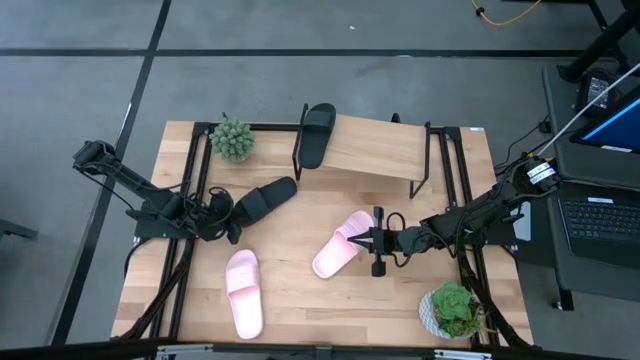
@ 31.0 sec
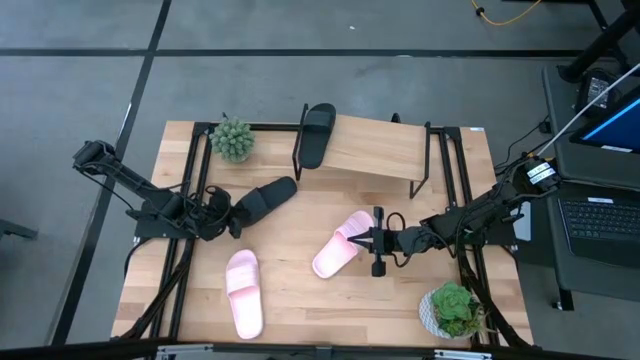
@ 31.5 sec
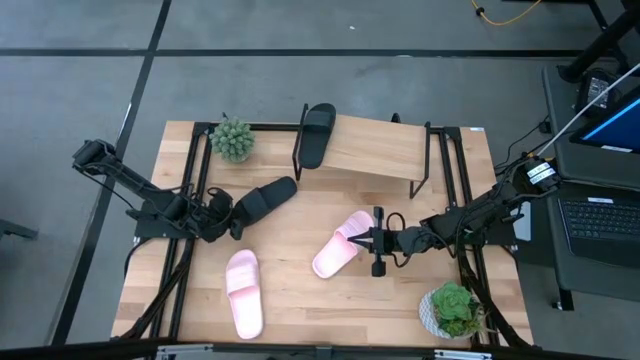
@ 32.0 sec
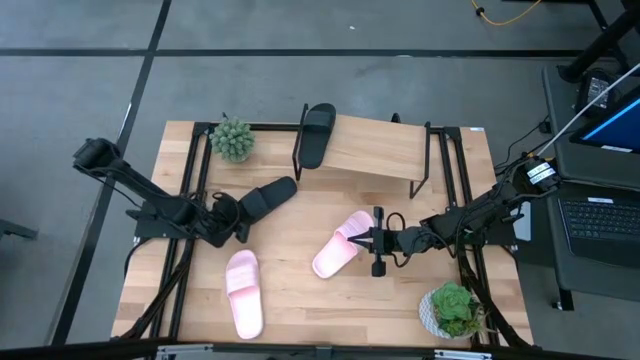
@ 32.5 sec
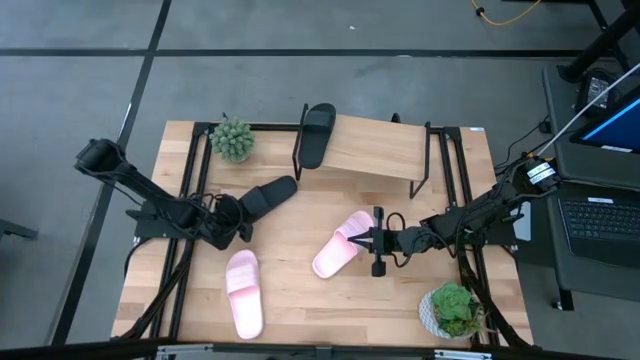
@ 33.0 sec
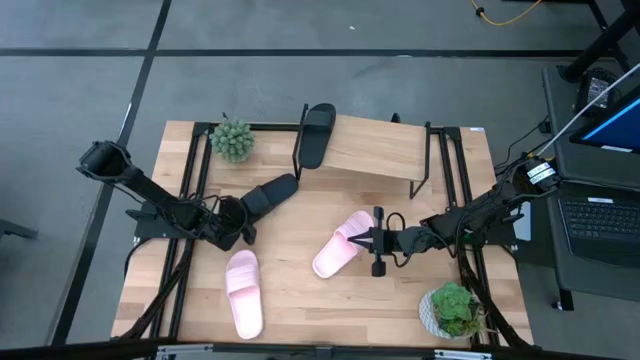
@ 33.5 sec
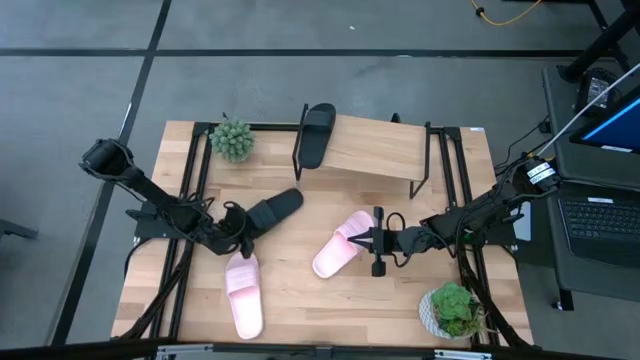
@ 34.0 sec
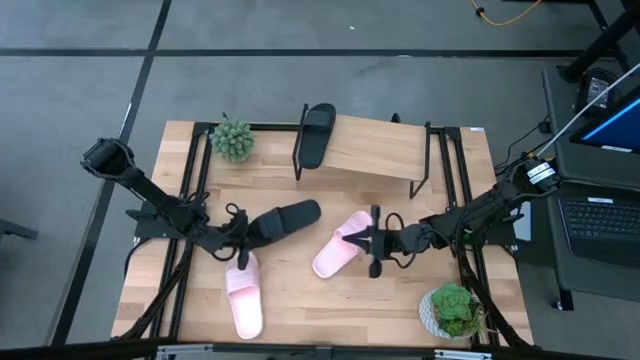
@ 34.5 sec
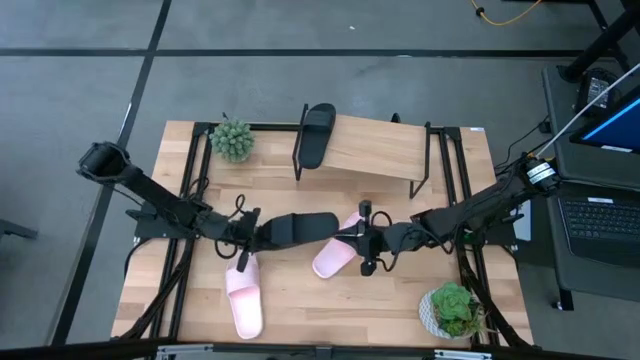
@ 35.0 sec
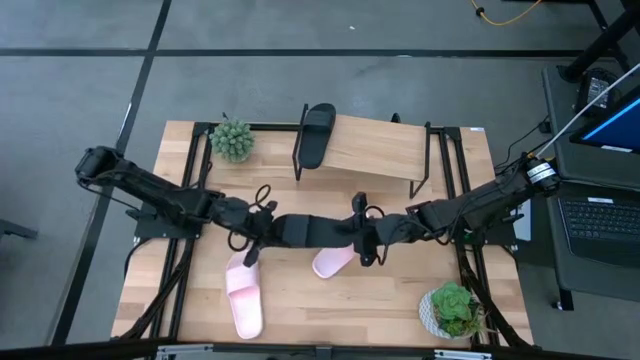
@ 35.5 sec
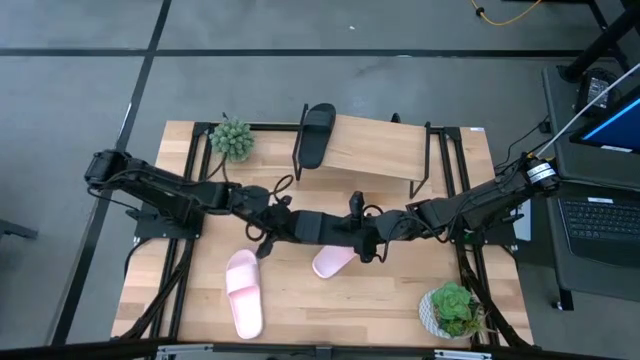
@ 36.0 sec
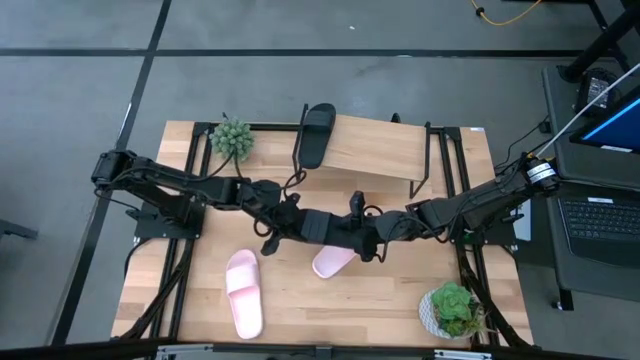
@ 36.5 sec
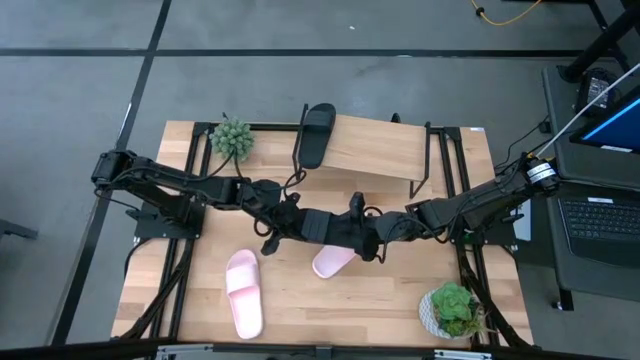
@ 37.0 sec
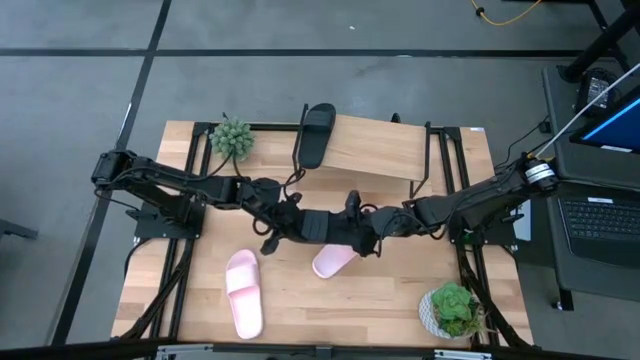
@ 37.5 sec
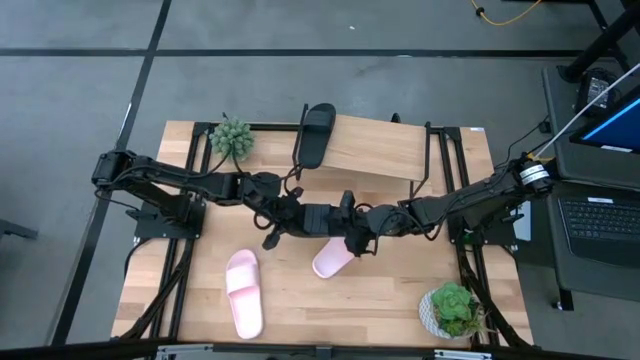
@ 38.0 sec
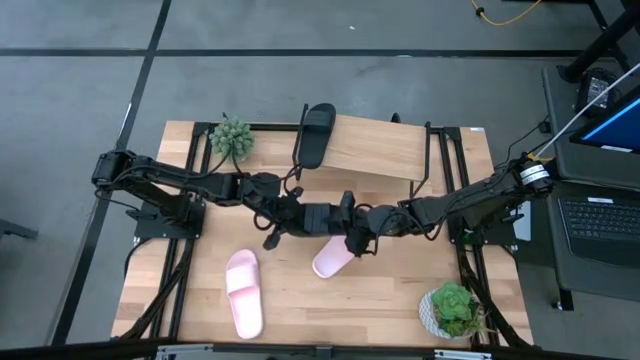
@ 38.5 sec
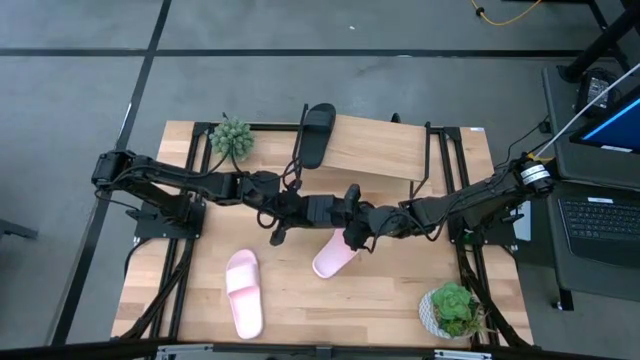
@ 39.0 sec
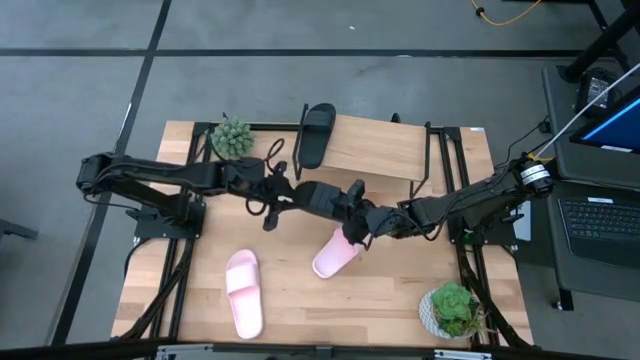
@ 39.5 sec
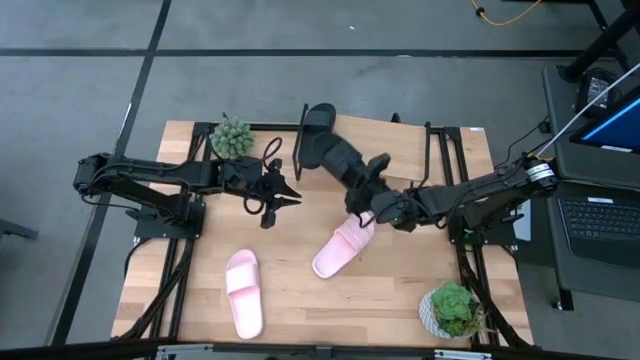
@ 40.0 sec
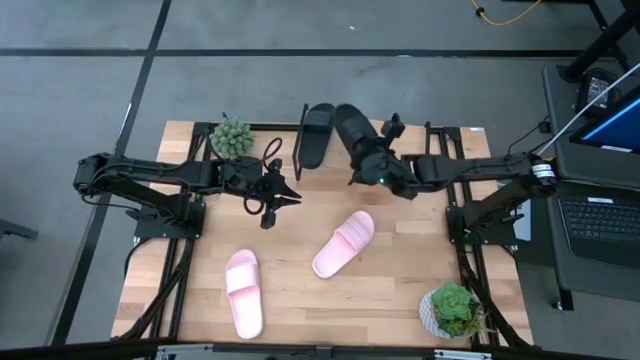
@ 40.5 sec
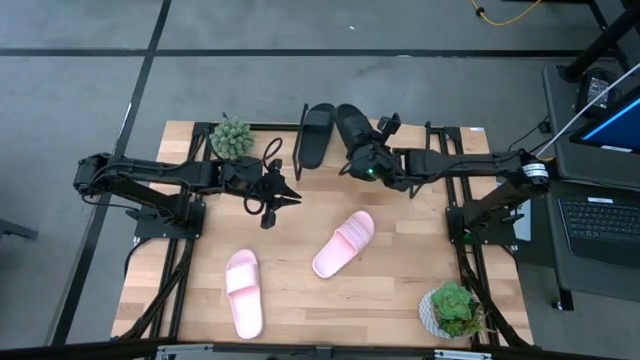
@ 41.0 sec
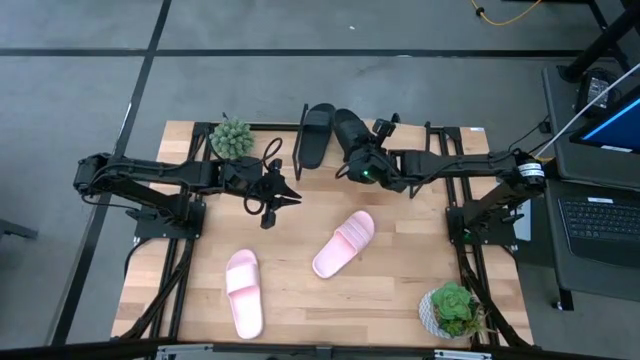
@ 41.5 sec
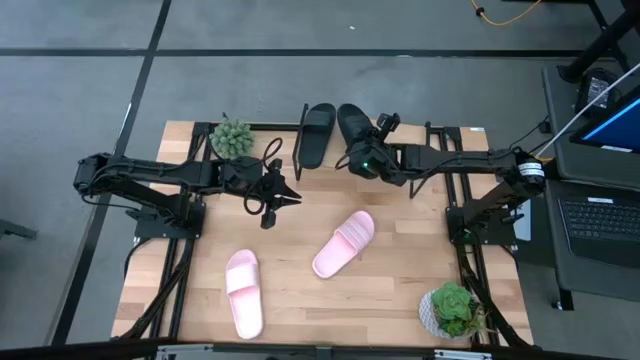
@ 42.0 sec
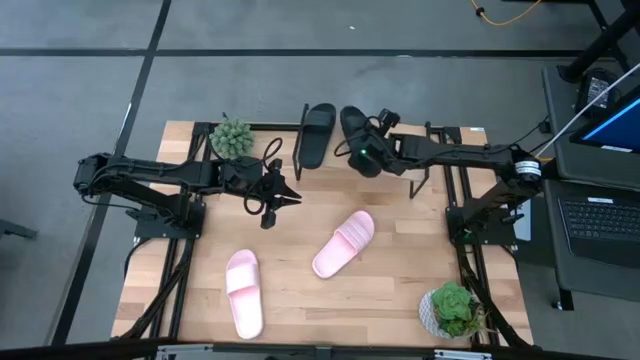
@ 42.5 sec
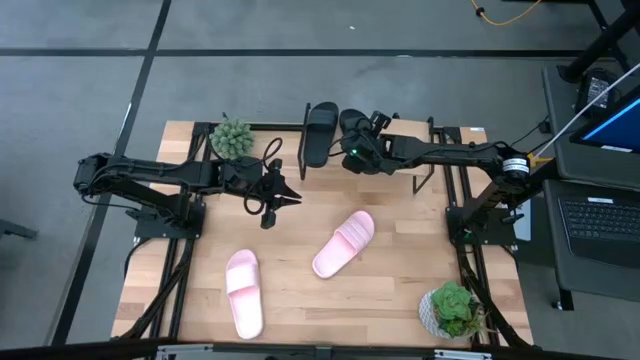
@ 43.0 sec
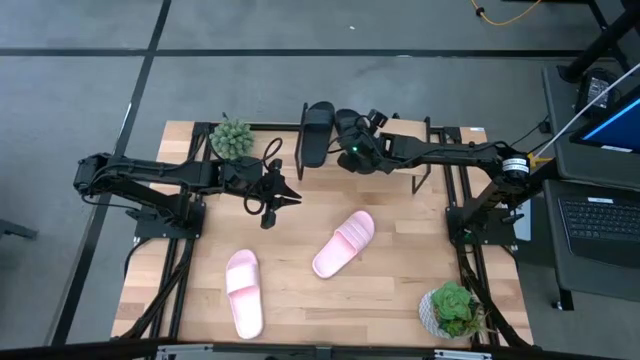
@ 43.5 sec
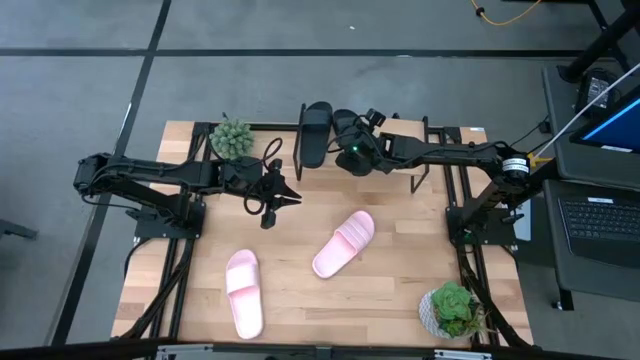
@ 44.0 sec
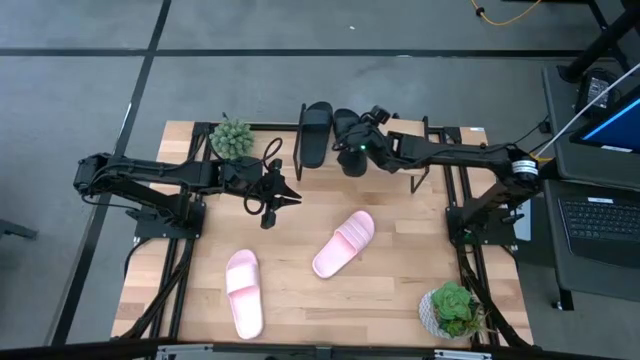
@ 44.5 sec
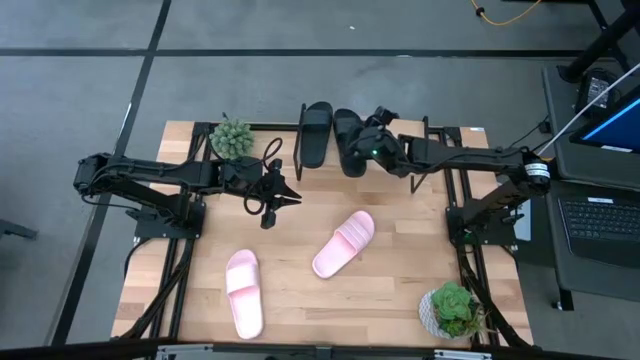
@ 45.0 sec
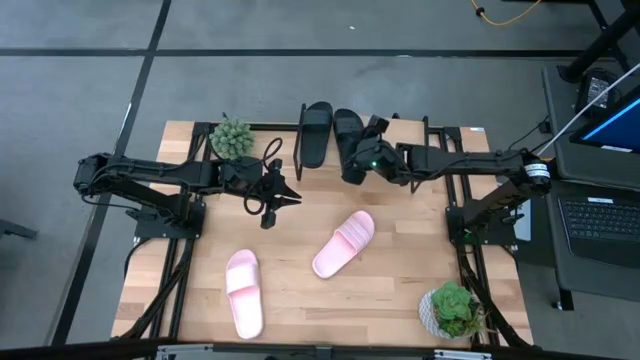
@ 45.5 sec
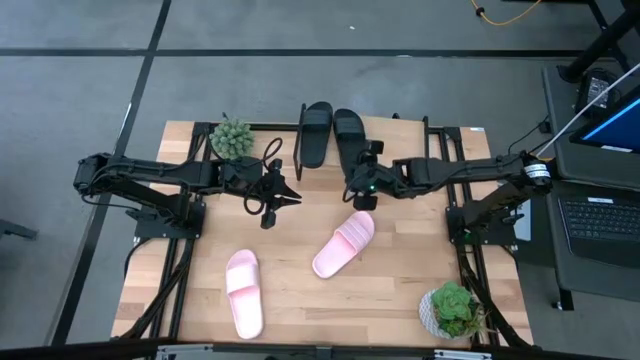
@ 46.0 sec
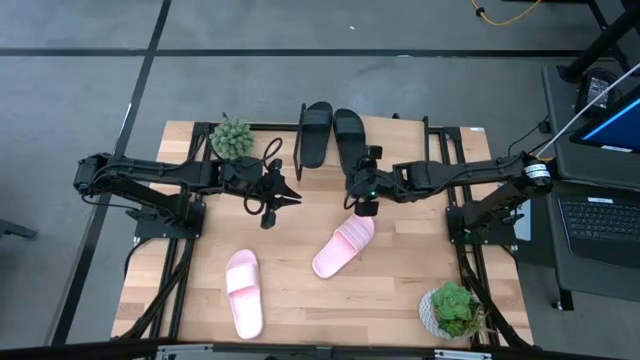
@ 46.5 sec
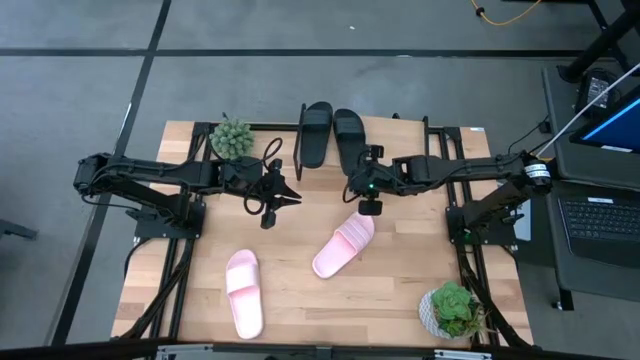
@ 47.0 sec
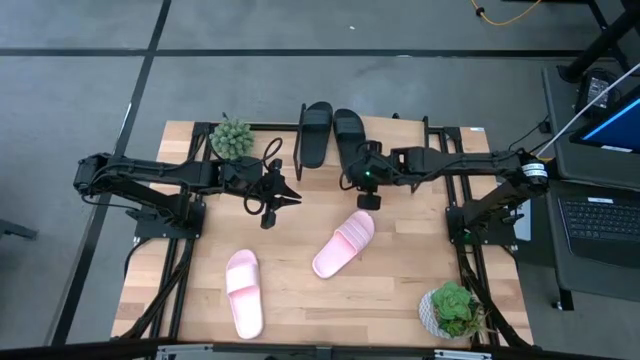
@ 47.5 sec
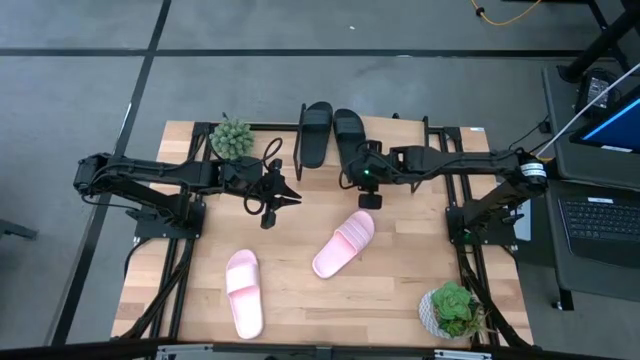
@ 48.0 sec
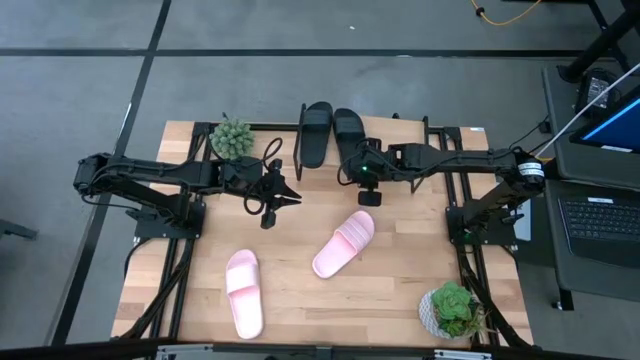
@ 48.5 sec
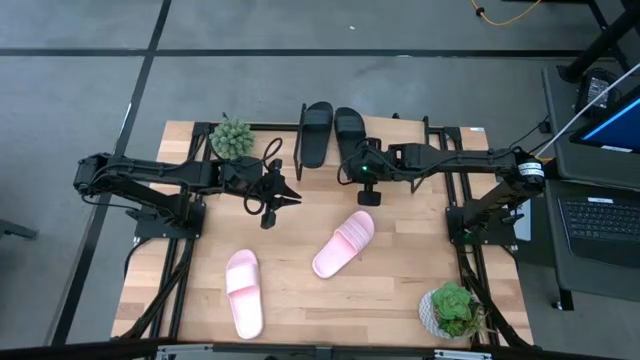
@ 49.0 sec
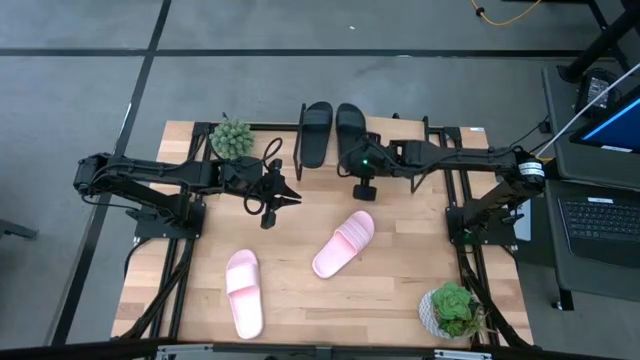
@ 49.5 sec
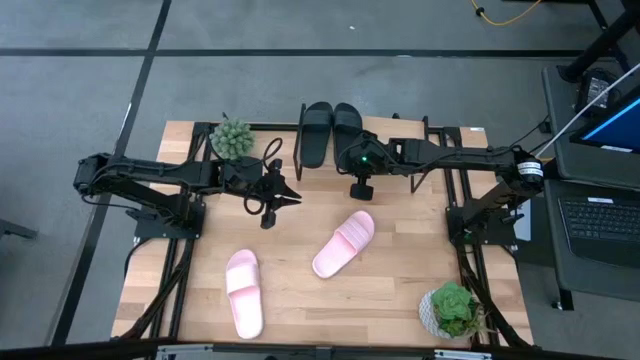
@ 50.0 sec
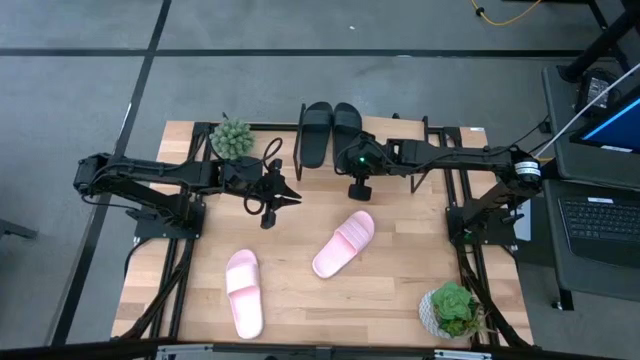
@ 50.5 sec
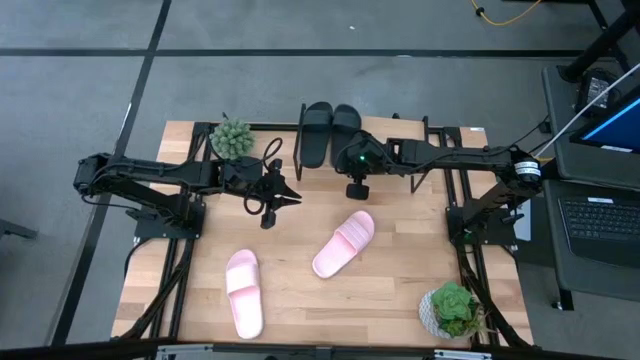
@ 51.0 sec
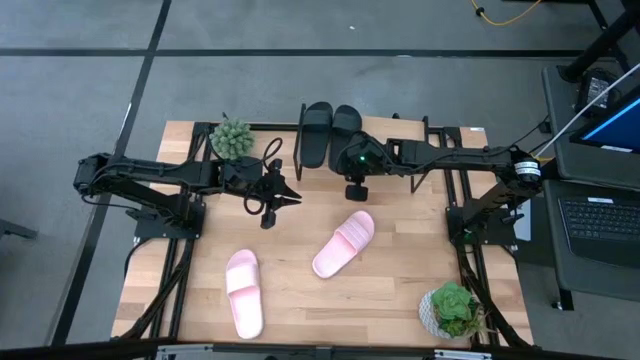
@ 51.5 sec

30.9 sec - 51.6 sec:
Task: Pick and place slides into the shelf
Put the black slide on the shelf
